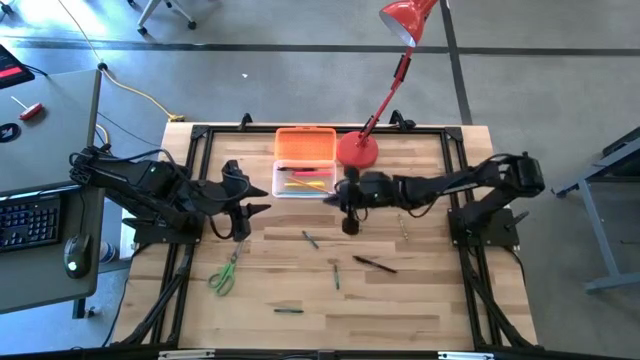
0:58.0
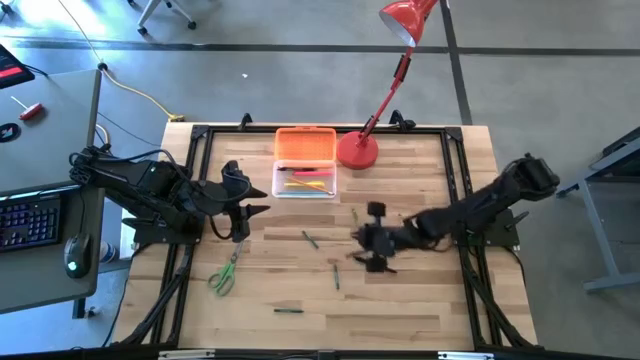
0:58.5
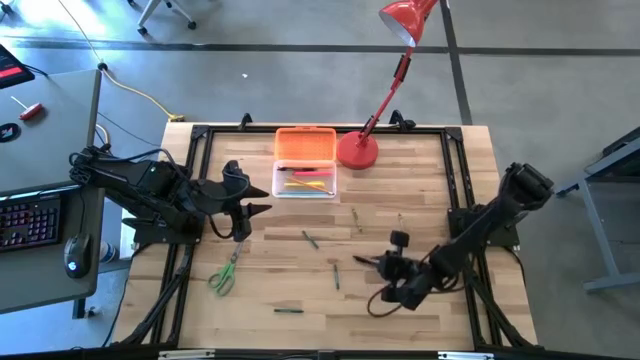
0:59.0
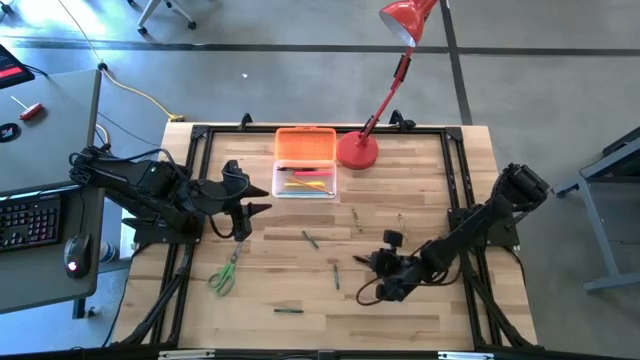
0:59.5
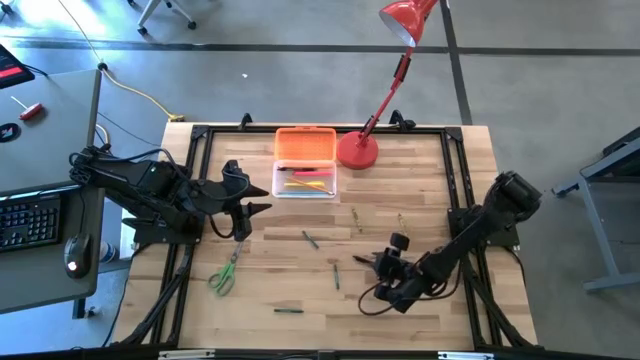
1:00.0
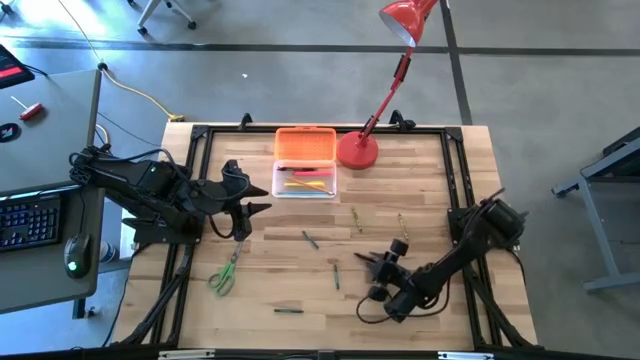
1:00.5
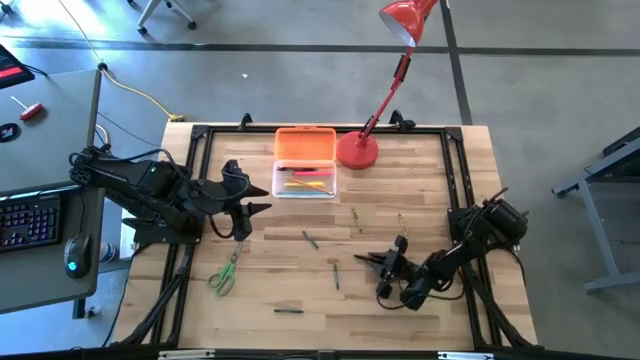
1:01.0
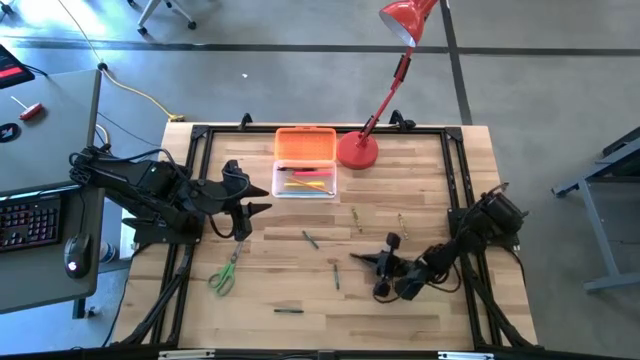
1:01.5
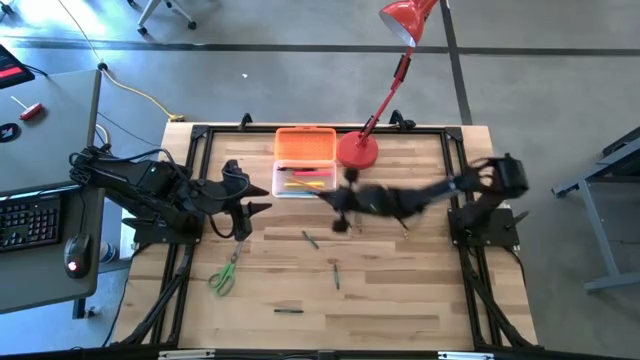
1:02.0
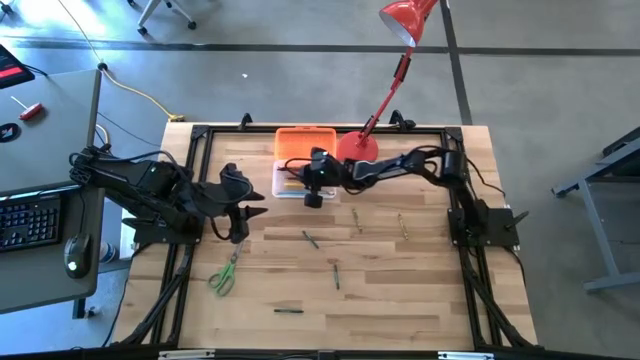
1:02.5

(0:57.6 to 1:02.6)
Task: Pick & place school supplies into a supply box
Put the black pen into the orange supply box

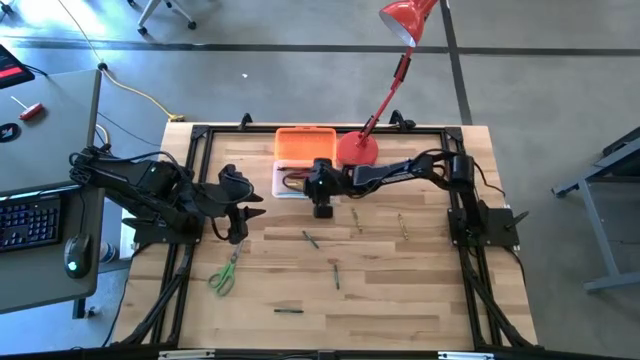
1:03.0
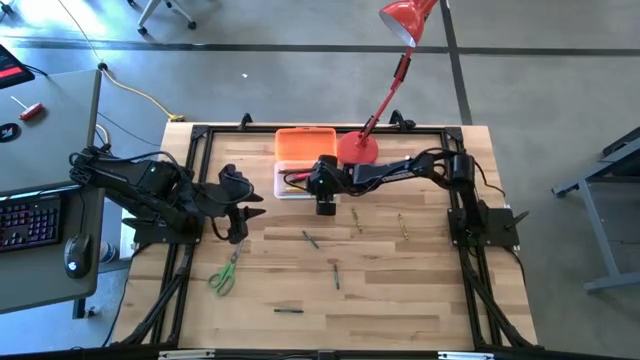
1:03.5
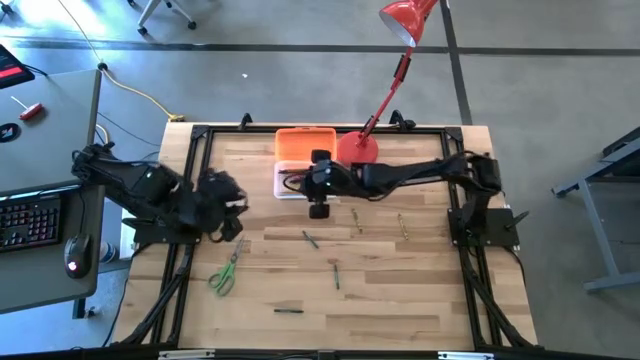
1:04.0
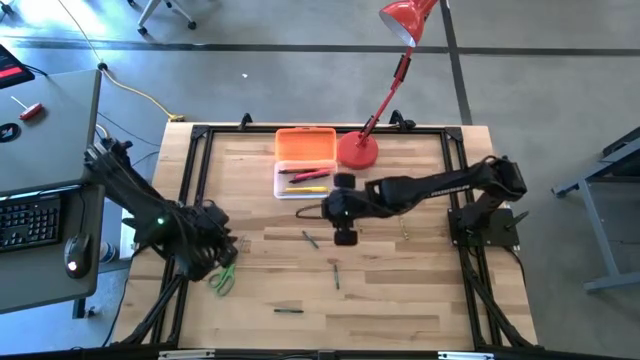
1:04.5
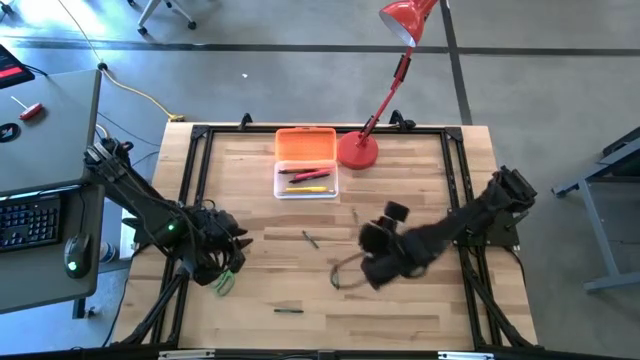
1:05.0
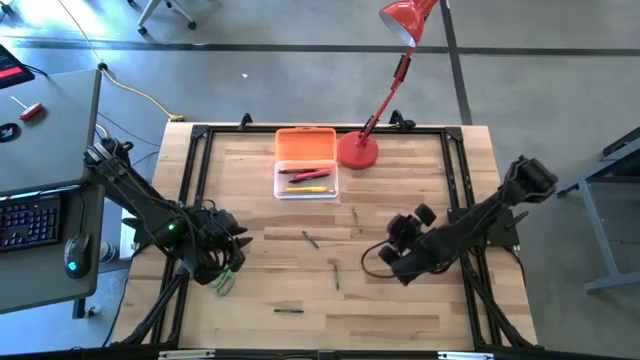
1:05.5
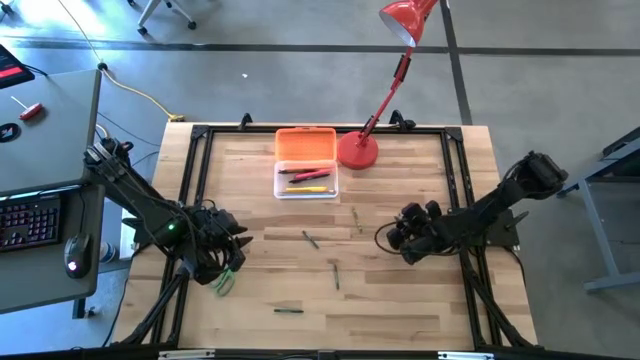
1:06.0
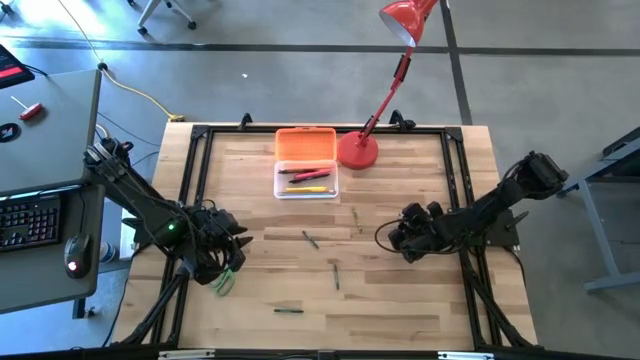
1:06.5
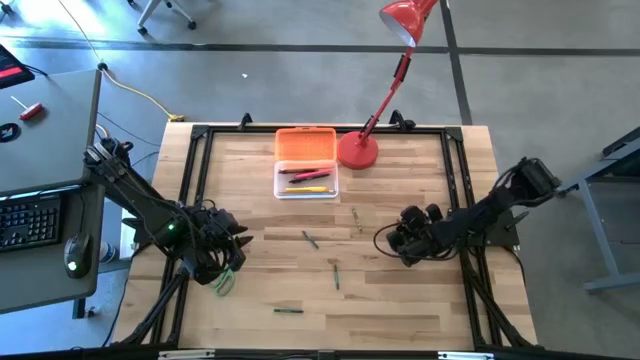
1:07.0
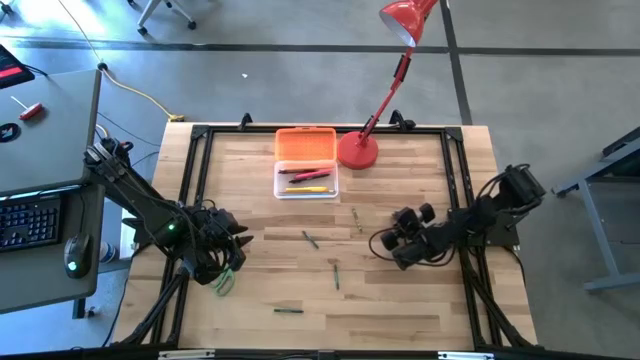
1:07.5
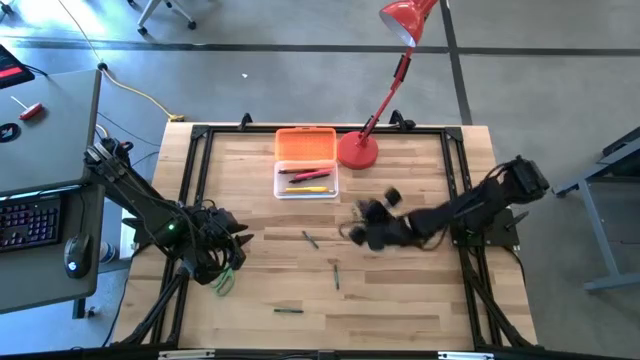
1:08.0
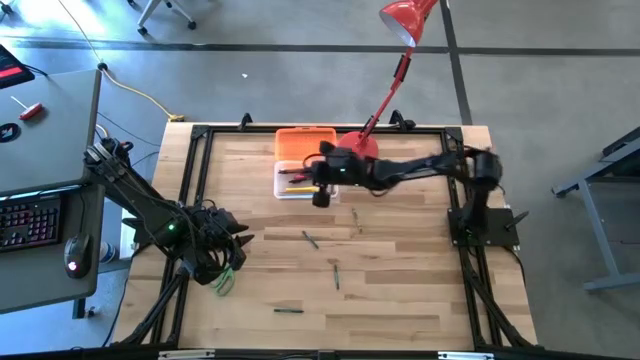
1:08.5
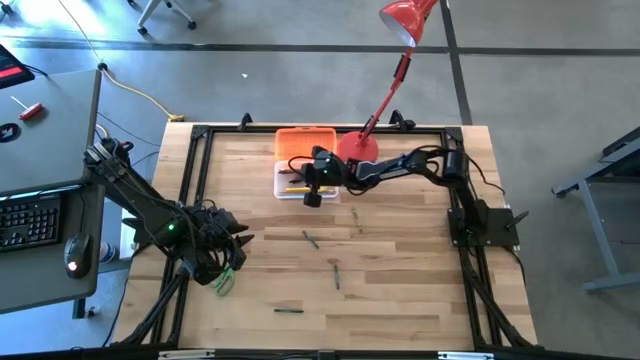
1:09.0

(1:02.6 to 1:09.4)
Put the right green crayon into the orange supply box

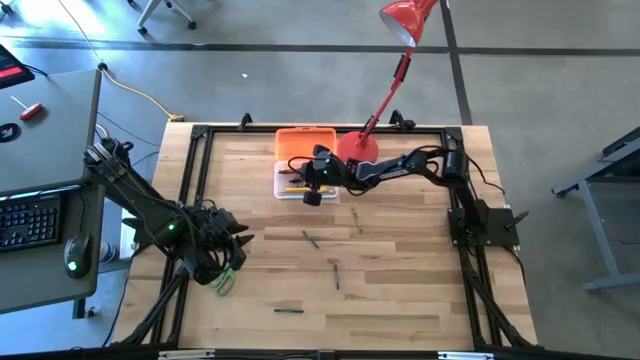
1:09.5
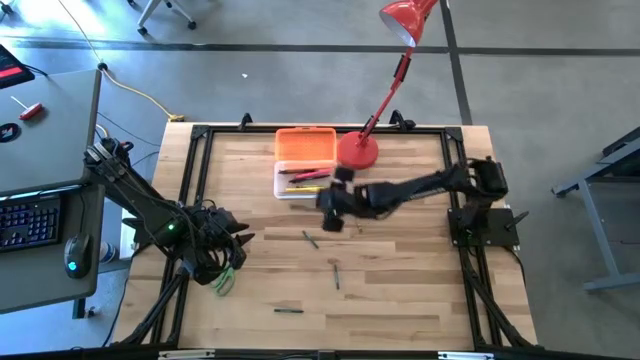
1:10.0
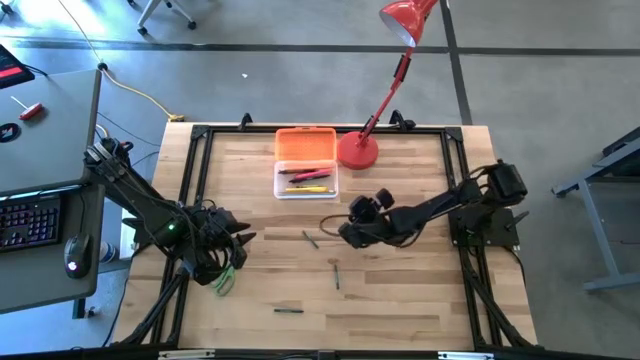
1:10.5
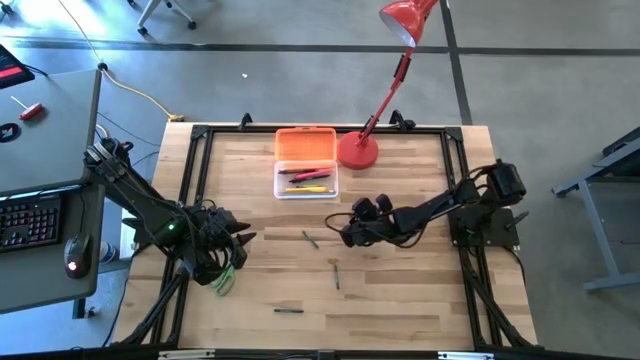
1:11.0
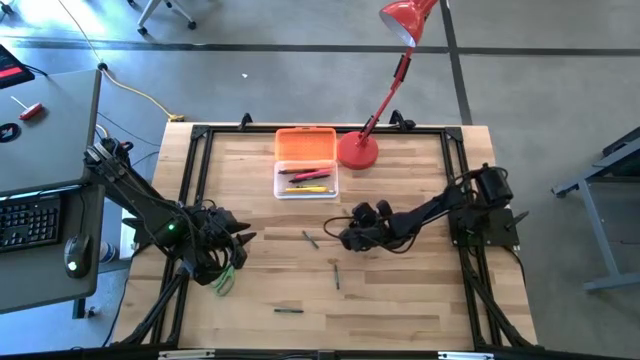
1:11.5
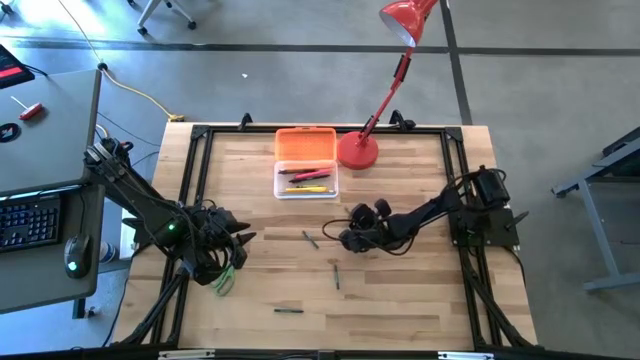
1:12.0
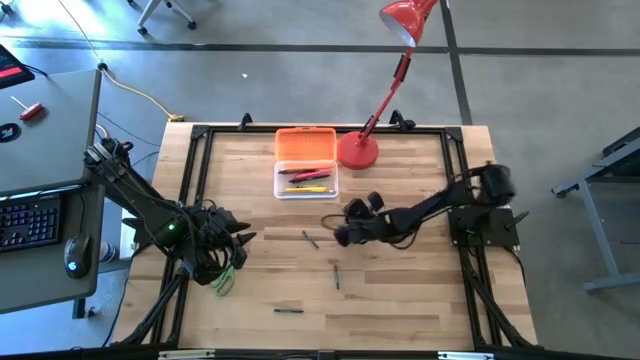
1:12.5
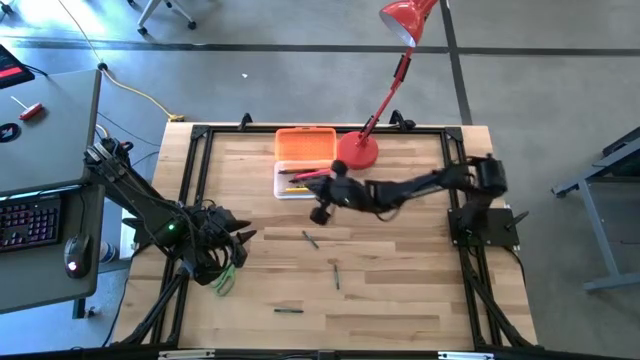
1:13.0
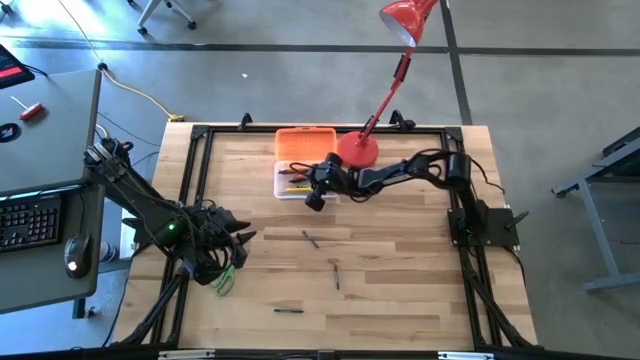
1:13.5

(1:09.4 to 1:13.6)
Put the green crayon into the orange supply box

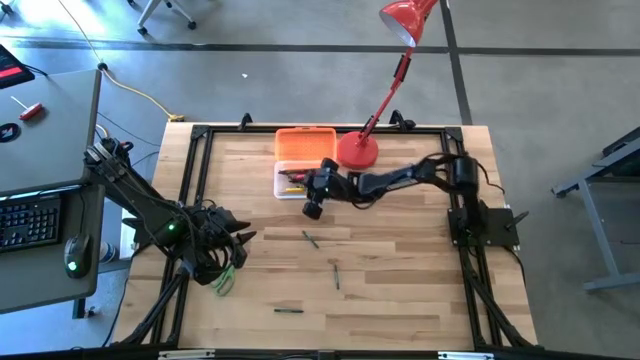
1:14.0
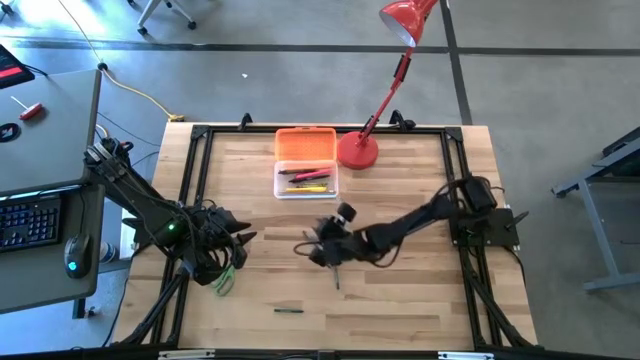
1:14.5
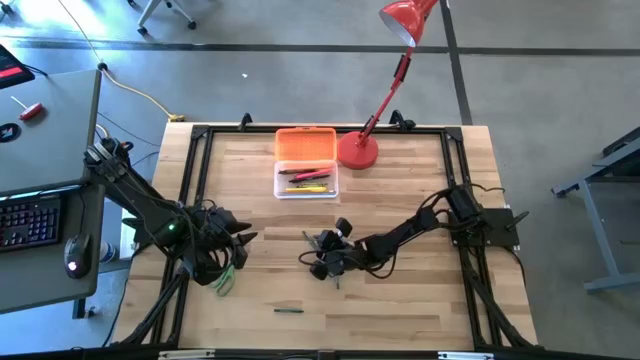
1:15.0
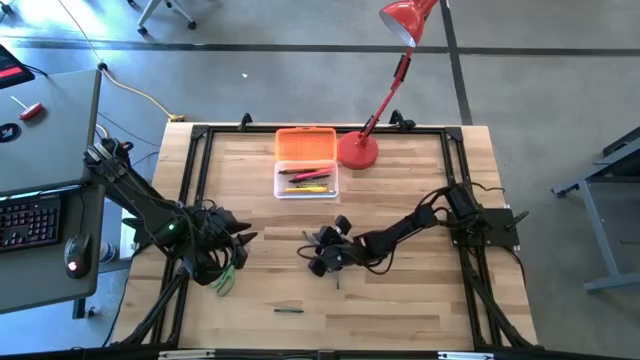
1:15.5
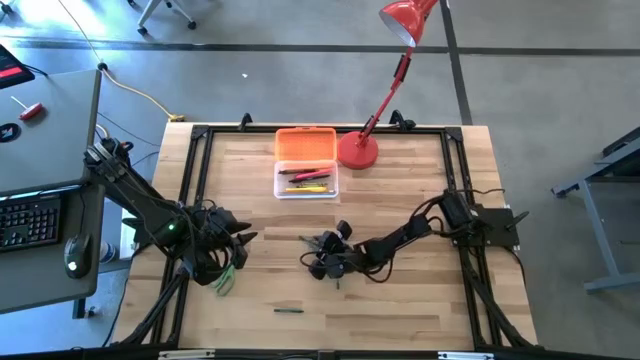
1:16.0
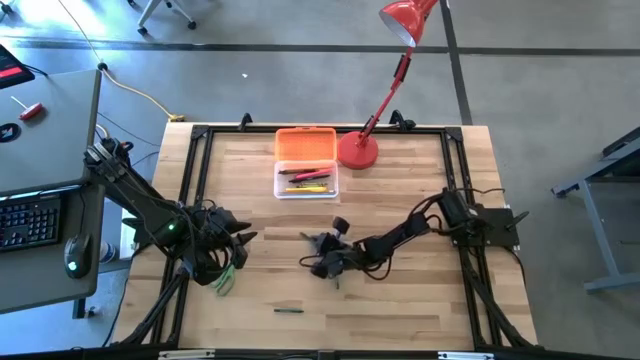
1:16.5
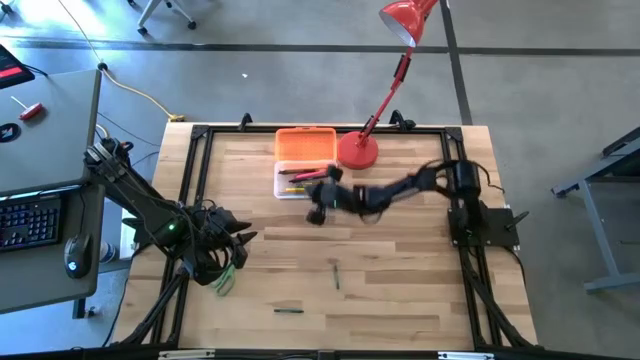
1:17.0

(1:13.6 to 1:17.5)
Put the top dark green crayon into the orange supply box

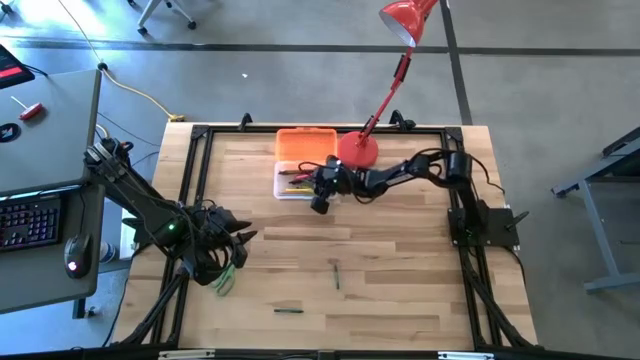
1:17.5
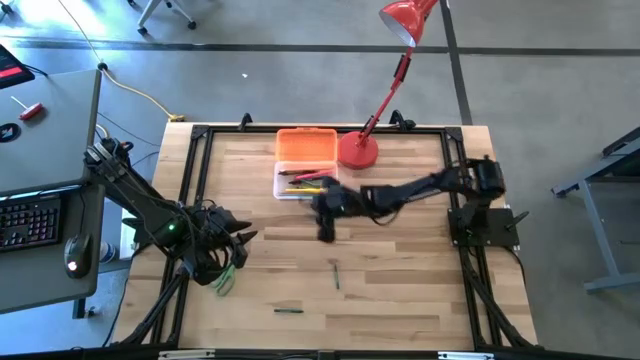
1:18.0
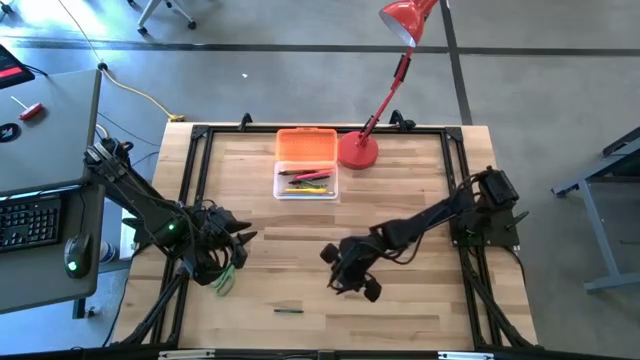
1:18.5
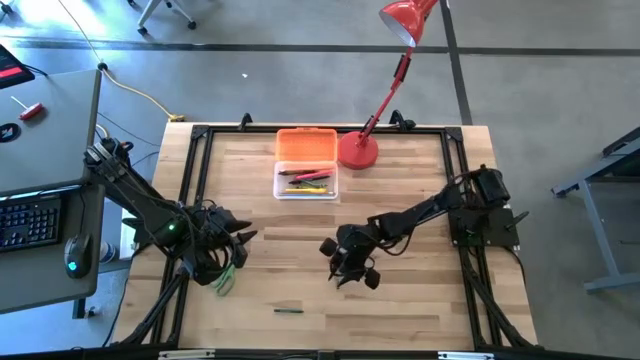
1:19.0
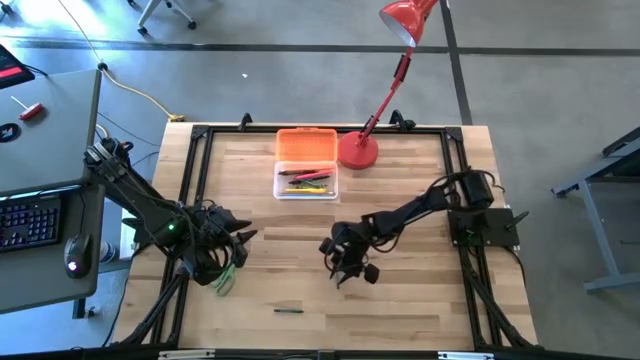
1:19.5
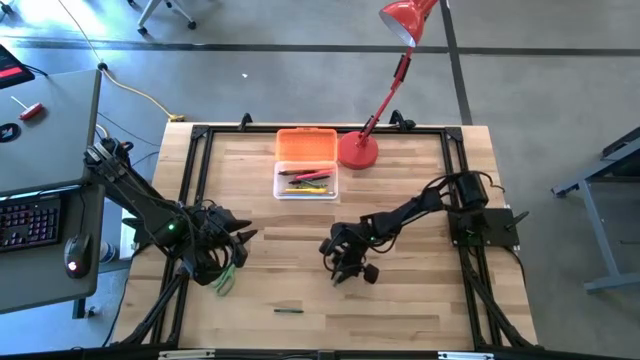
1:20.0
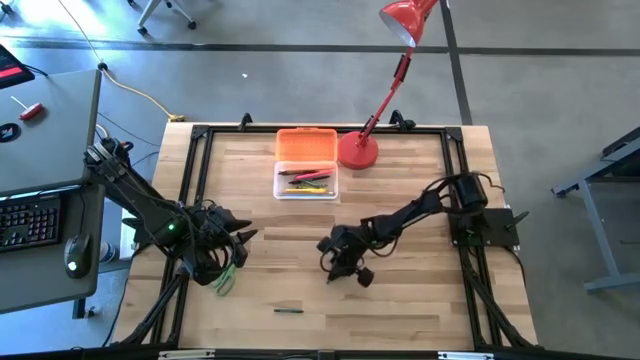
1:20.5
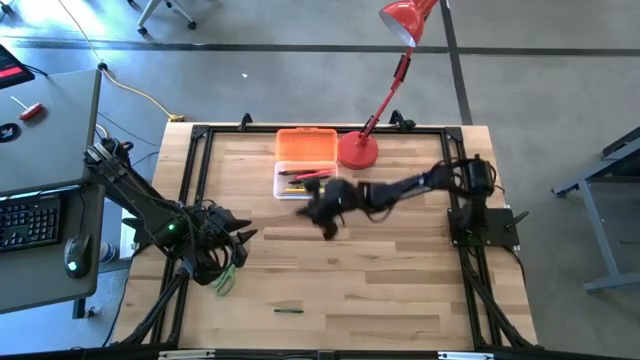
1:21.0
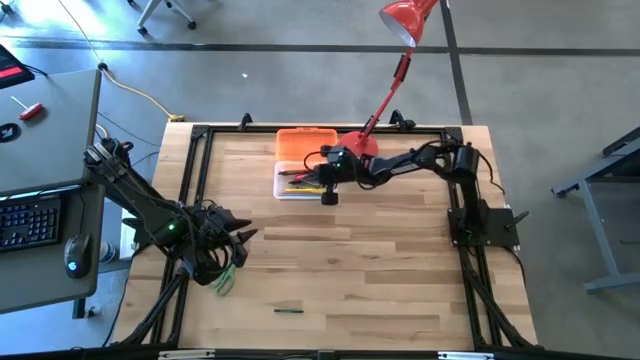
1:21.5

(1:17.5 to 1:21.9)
Put the top dark green crayon into the orange supply box
